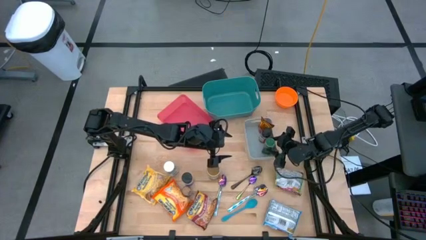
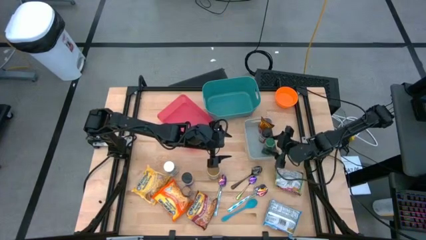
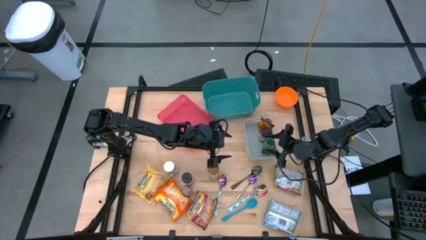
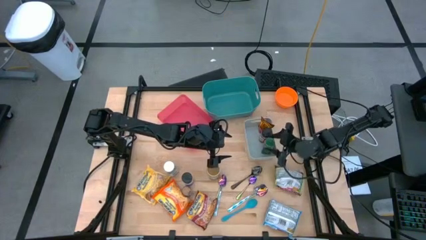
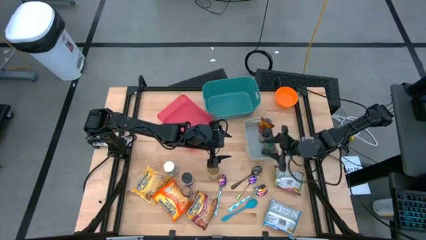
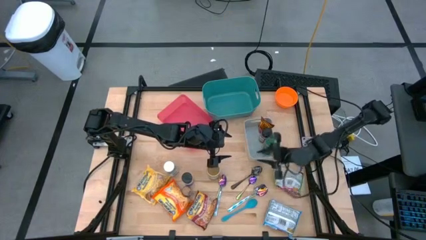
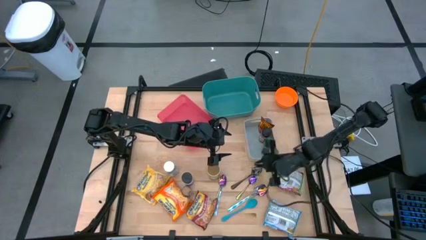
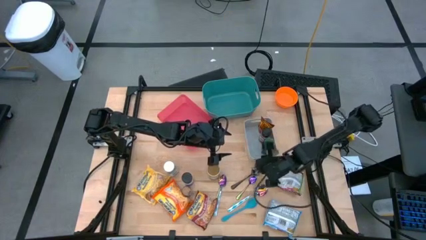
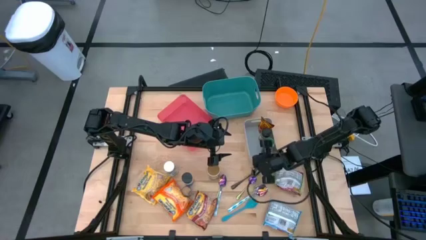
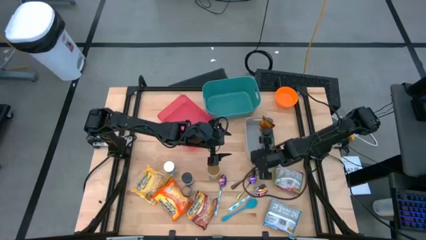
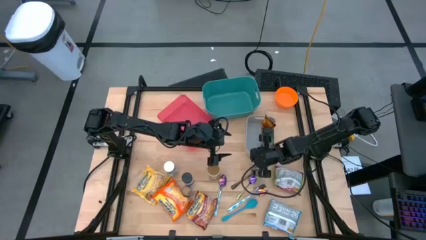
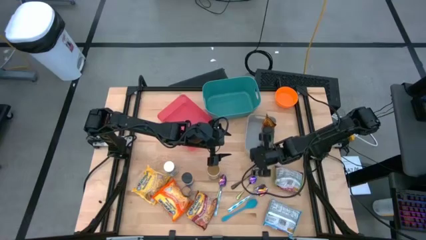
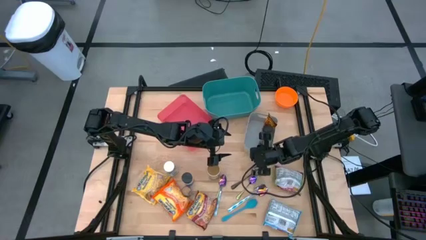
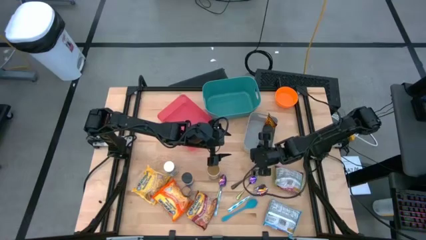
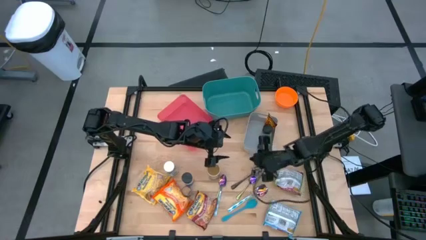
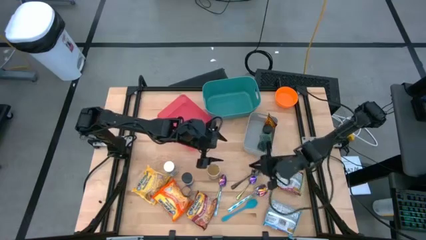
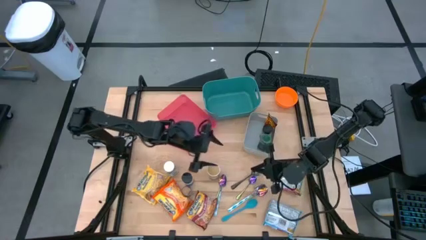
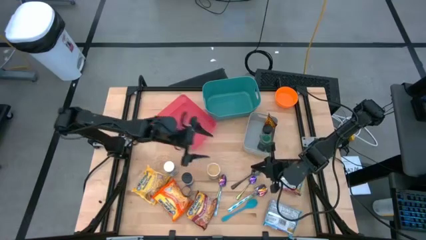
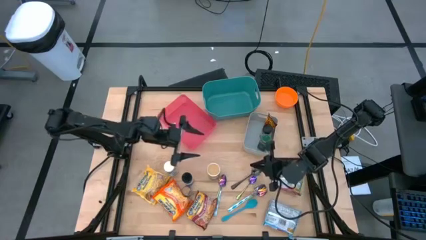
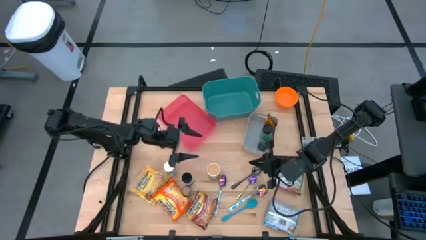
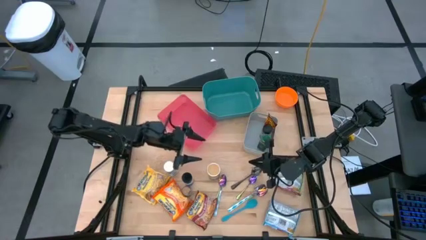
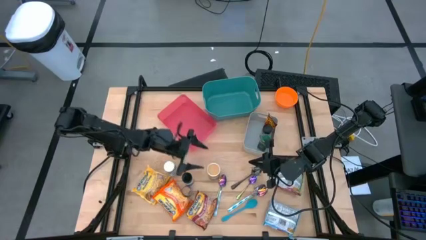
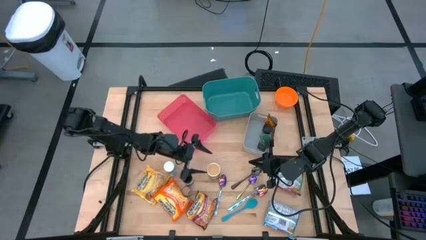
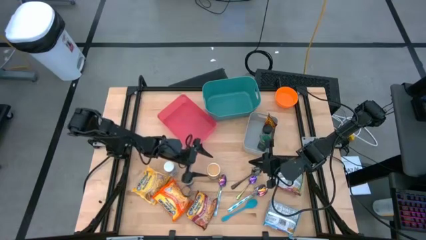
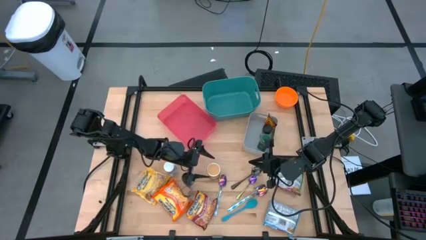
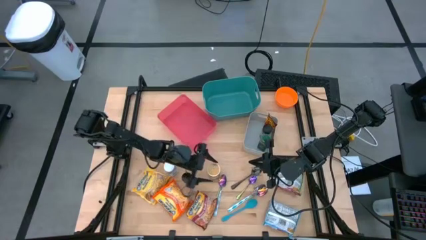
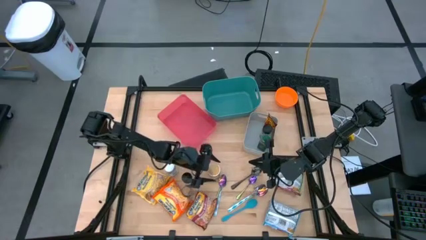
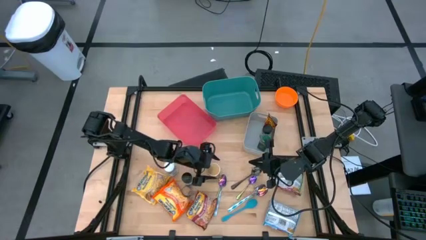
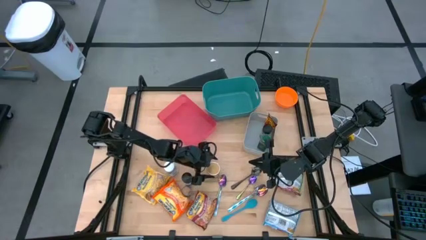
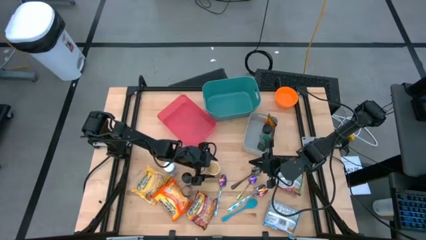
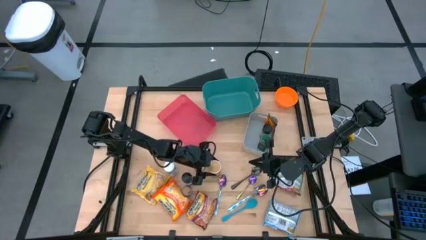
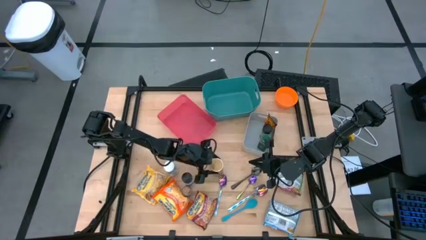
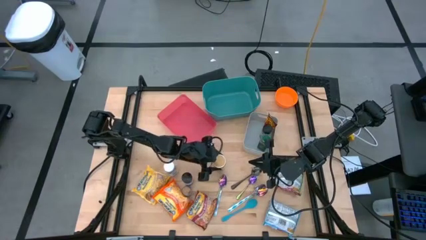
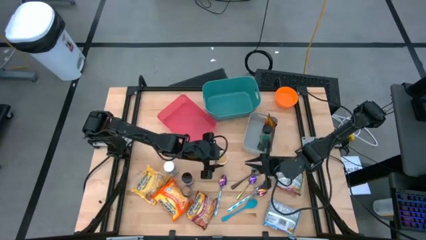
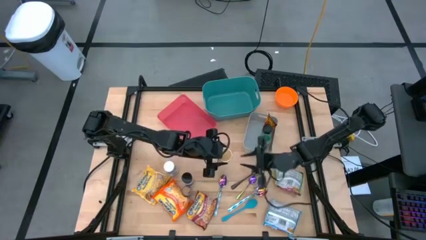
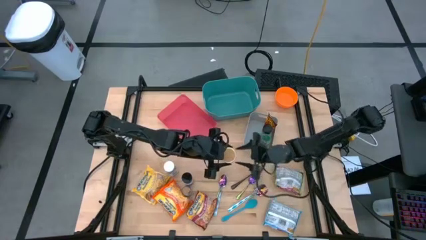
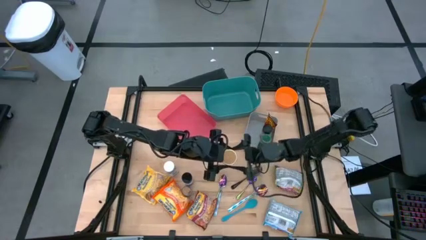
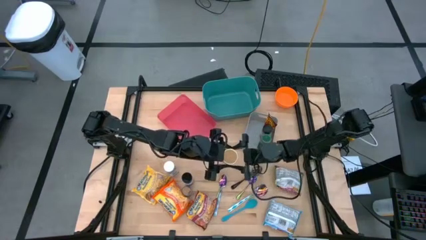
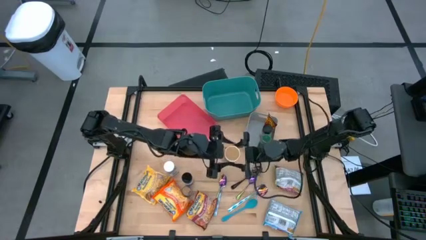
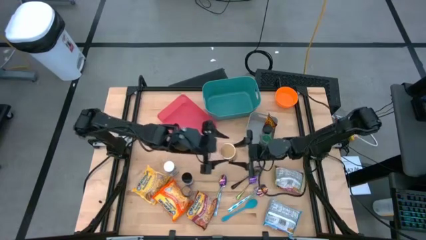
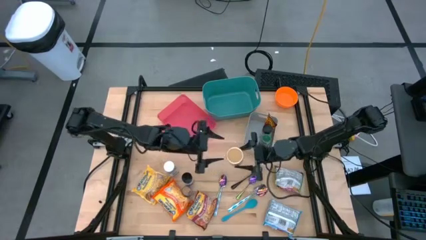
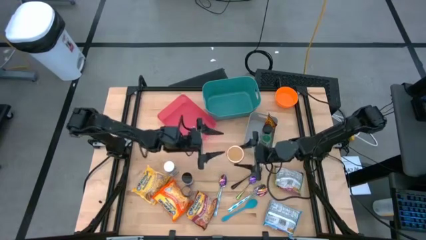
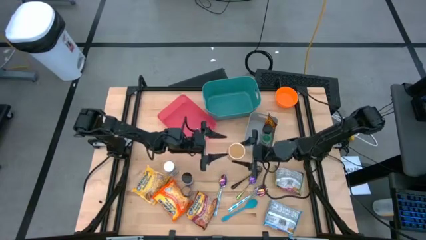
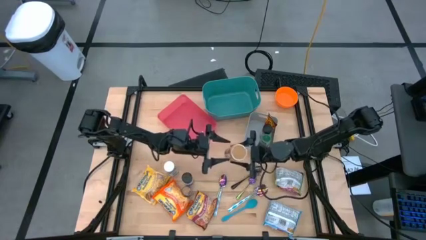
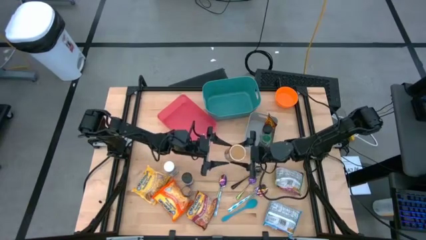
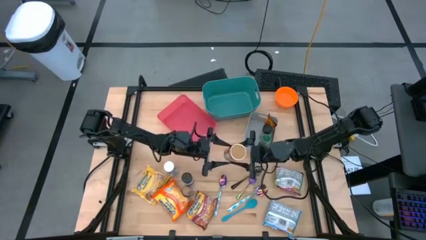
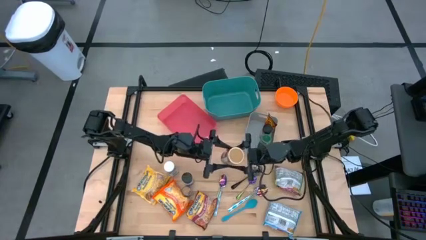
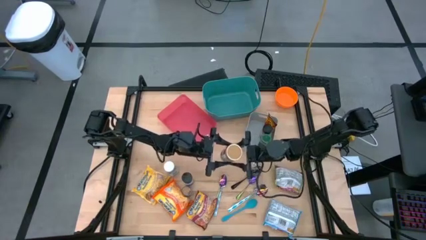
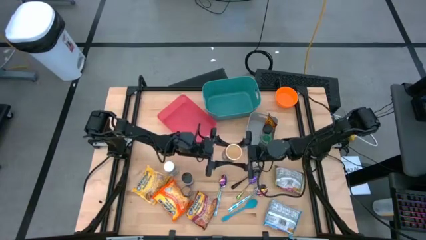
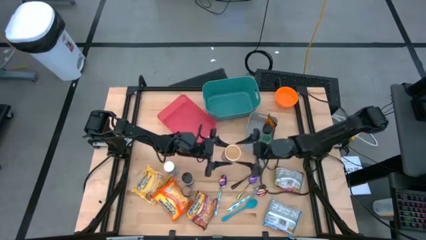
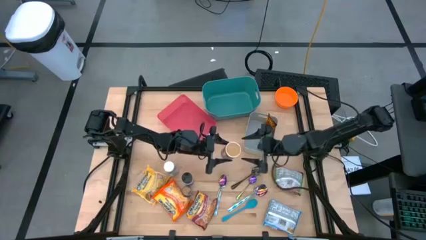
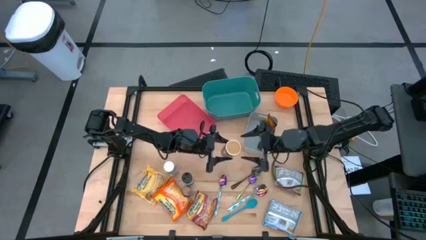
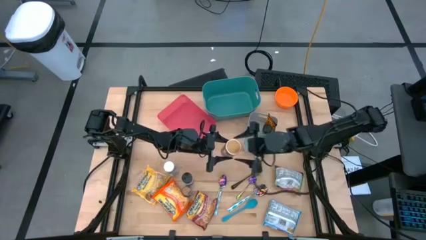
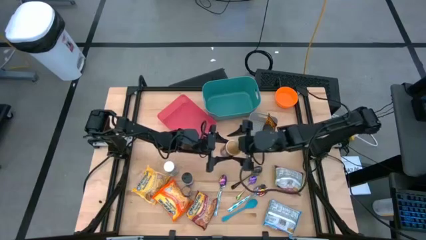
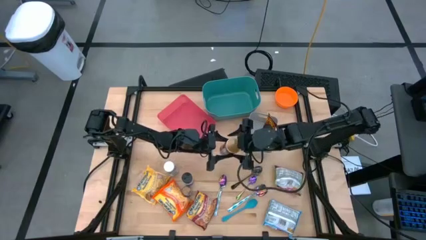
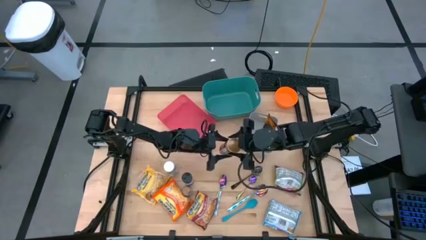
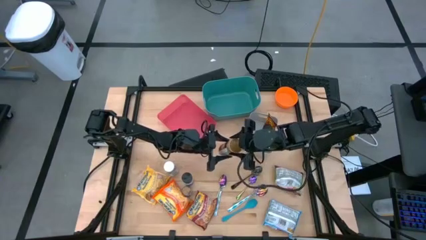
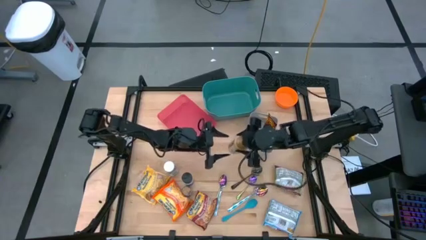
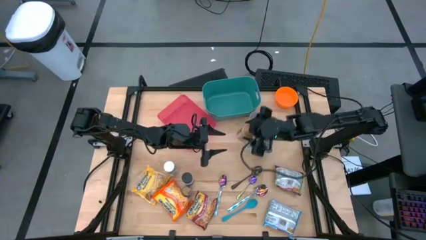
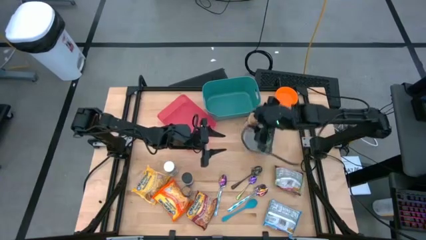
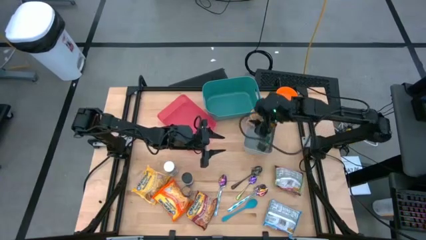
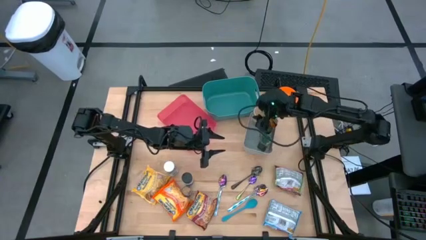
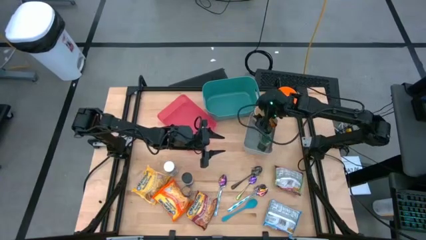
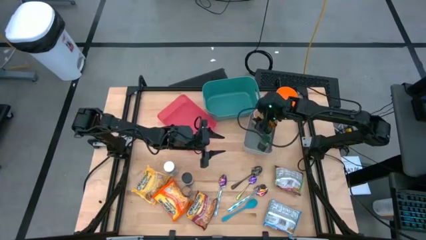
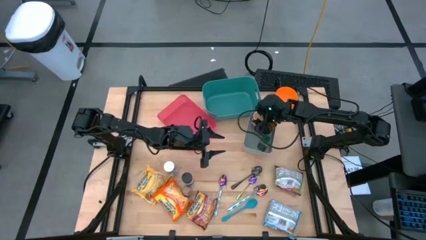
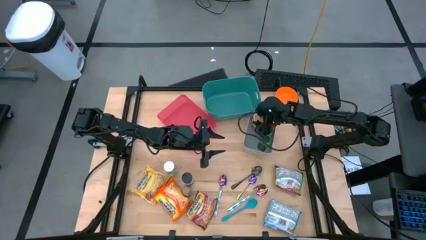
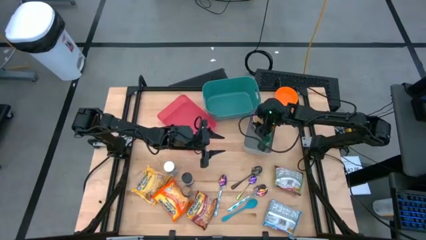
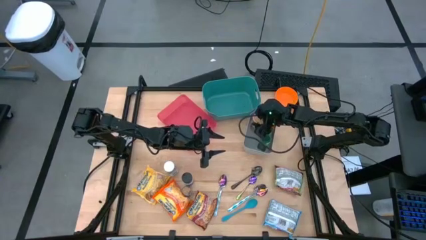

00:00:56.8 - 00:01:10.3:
Task: Pick & Place Food Item
Put the gold spice bottle into the gray bin

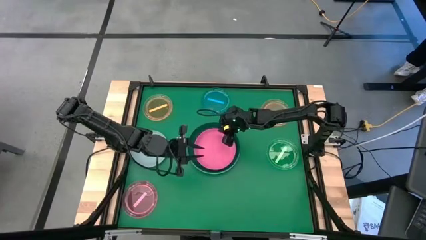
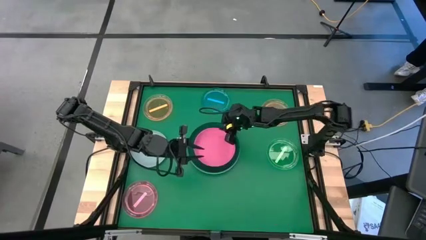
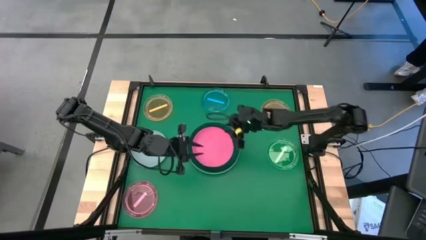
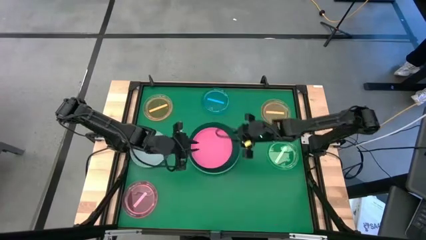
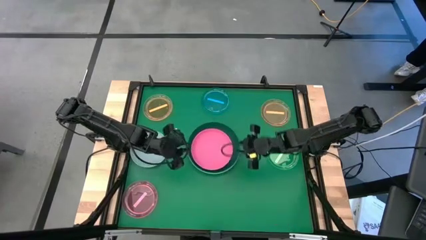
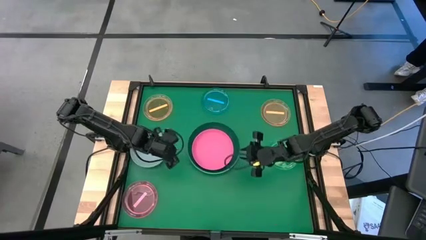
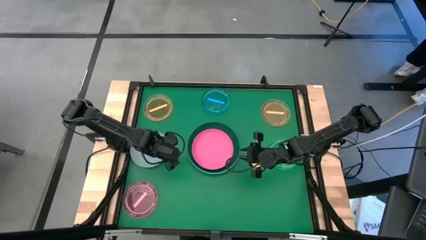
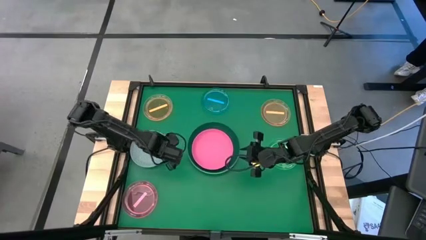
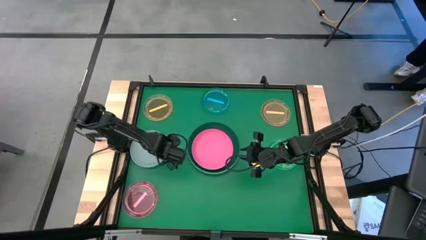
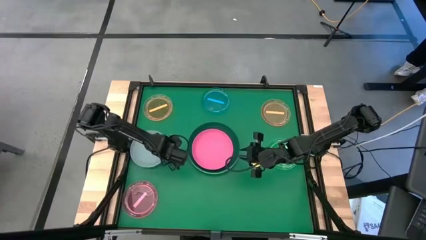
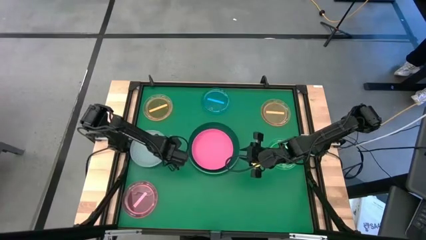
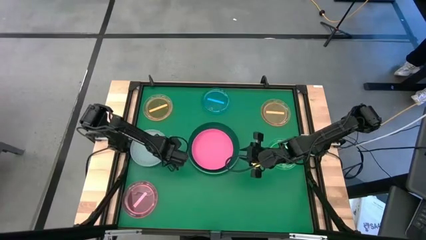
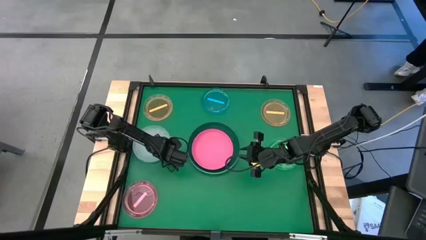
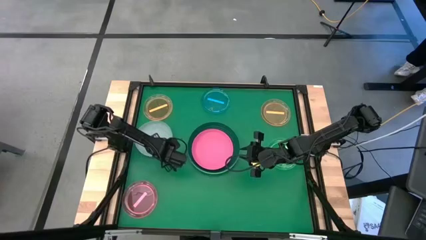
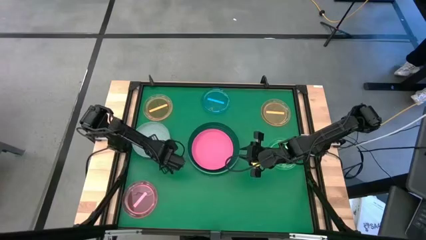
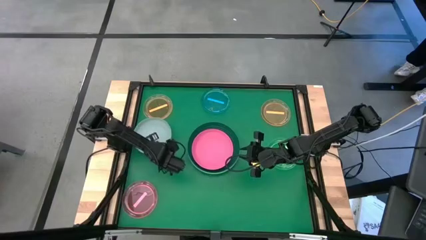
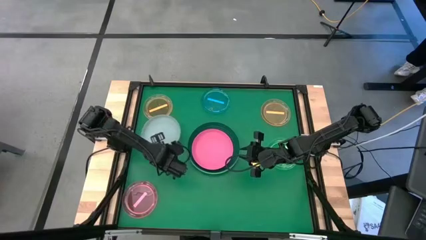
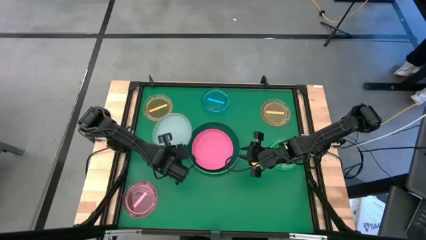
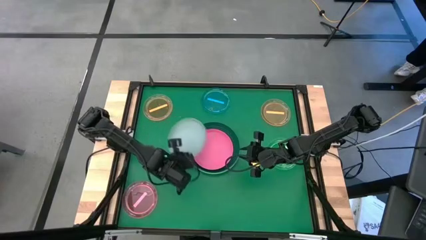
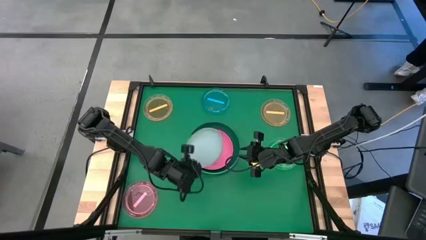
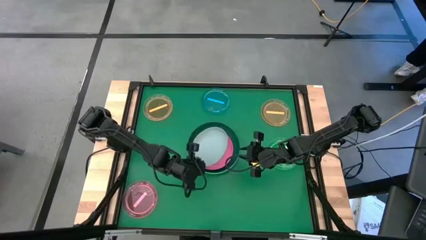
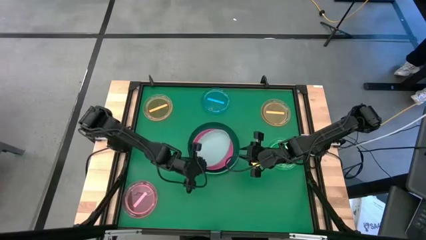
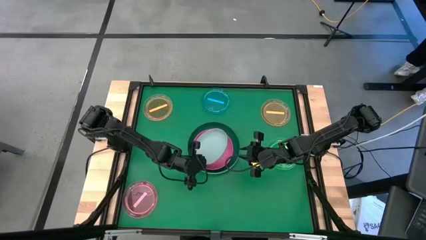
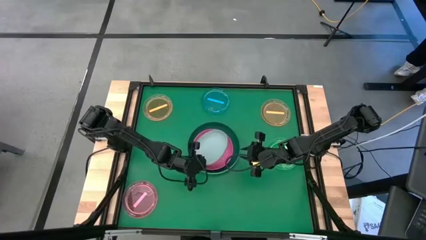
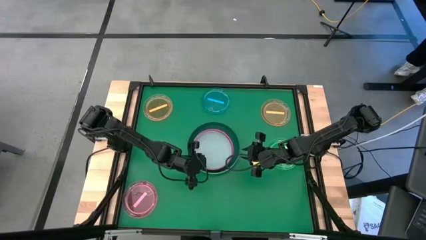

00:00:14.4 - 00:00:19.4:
Task: Stack plastic plates
Stack the gray plate on top of the pink plate
